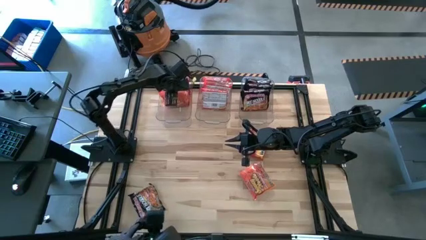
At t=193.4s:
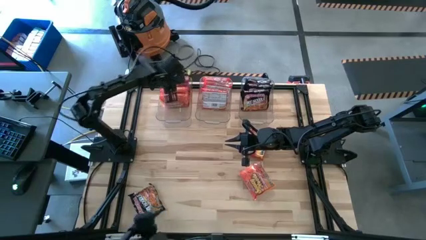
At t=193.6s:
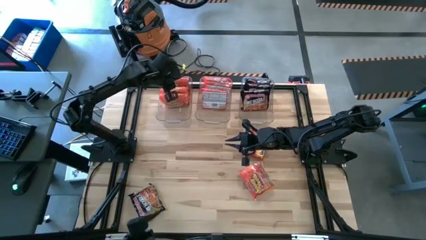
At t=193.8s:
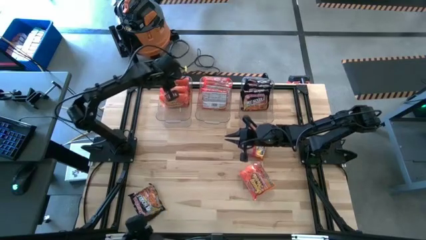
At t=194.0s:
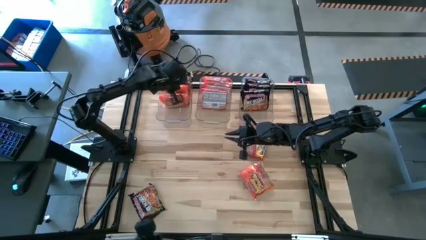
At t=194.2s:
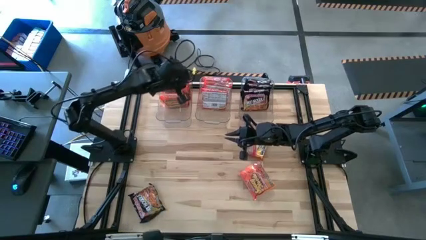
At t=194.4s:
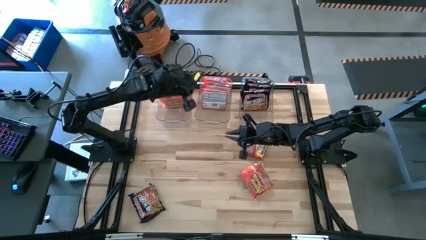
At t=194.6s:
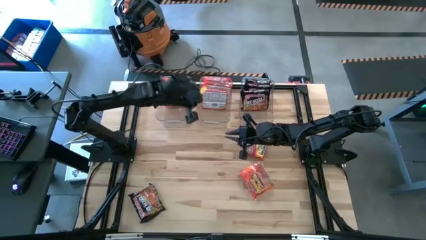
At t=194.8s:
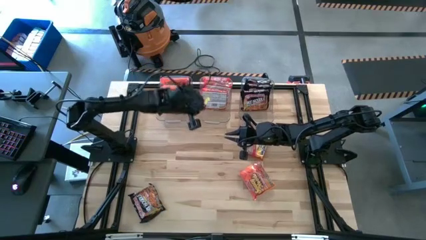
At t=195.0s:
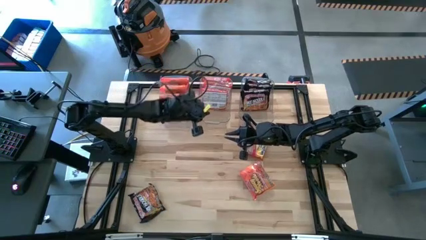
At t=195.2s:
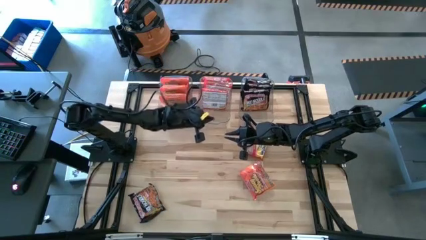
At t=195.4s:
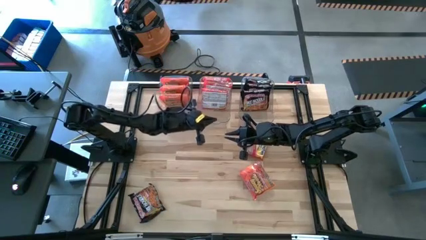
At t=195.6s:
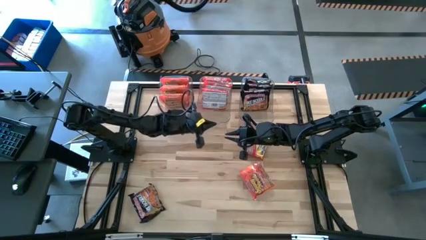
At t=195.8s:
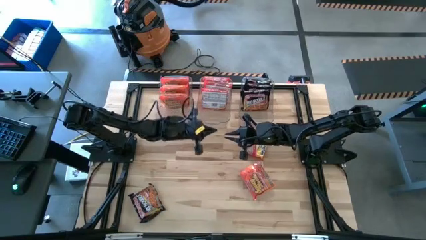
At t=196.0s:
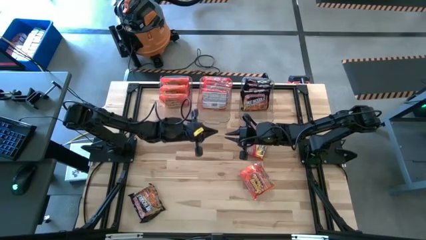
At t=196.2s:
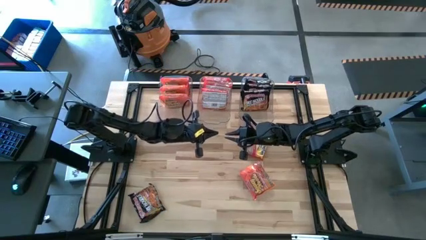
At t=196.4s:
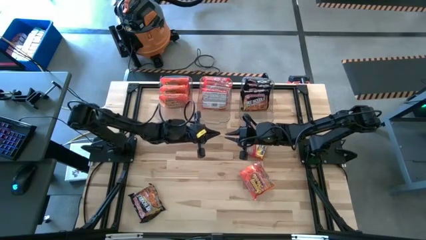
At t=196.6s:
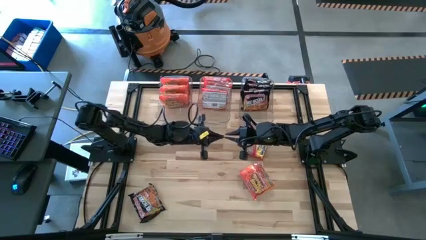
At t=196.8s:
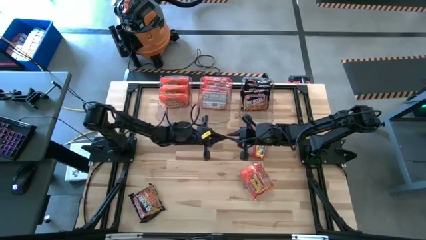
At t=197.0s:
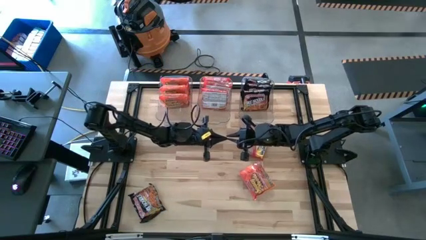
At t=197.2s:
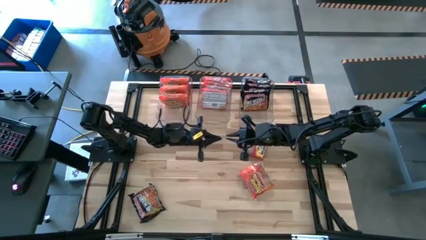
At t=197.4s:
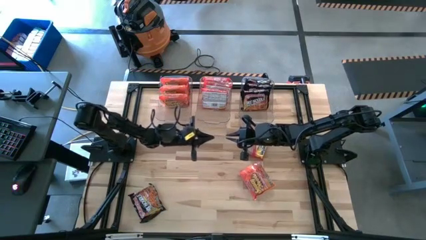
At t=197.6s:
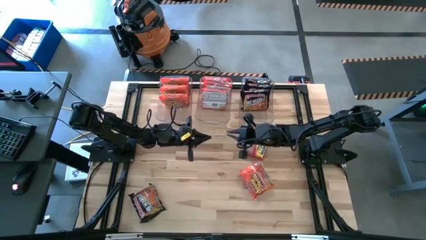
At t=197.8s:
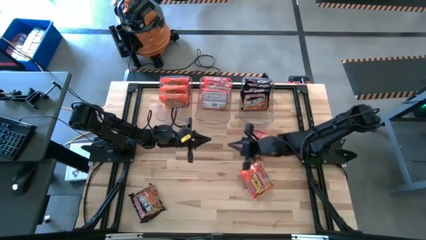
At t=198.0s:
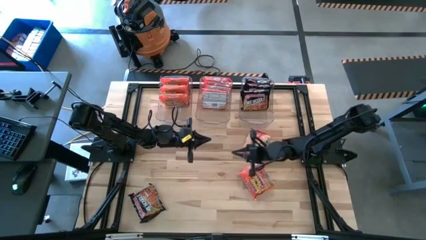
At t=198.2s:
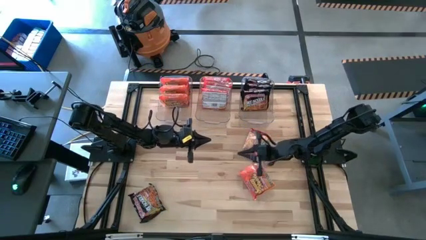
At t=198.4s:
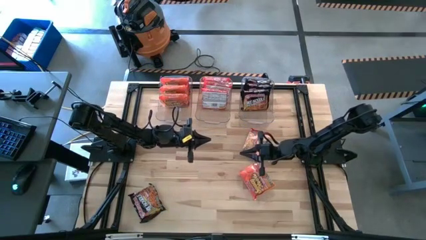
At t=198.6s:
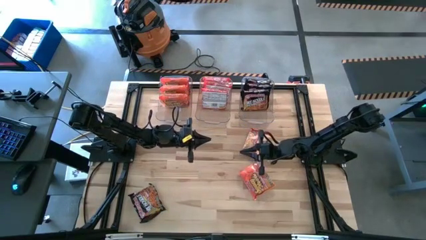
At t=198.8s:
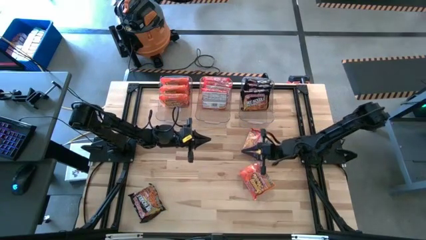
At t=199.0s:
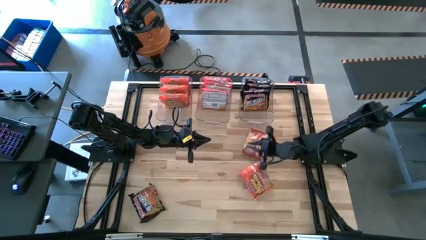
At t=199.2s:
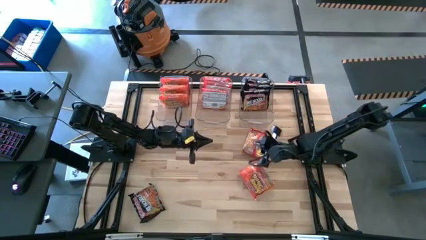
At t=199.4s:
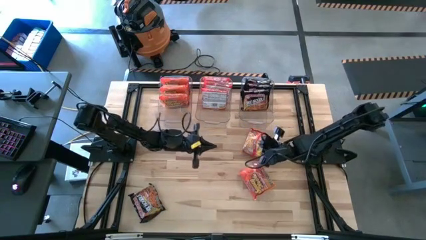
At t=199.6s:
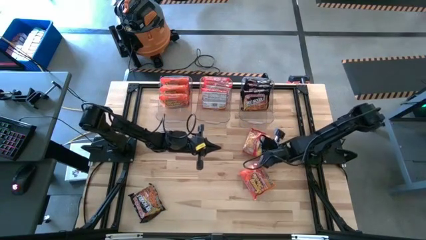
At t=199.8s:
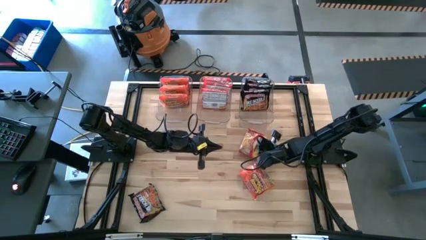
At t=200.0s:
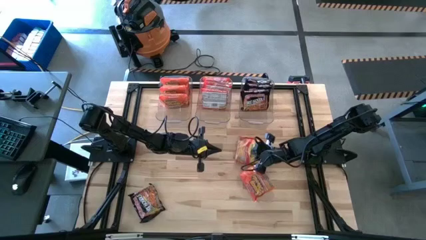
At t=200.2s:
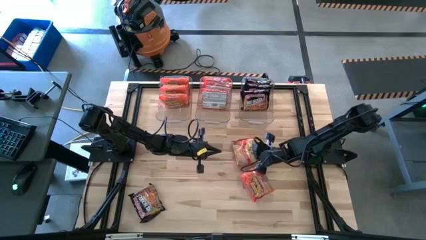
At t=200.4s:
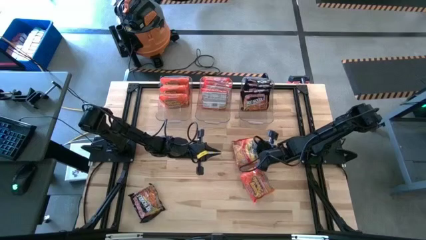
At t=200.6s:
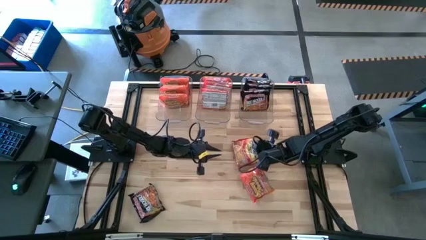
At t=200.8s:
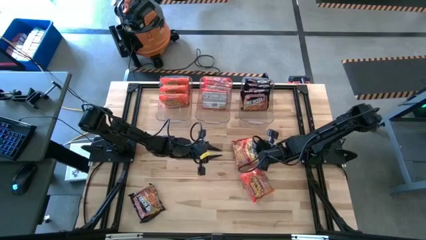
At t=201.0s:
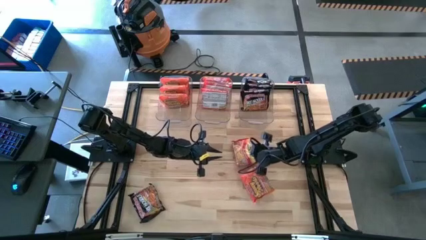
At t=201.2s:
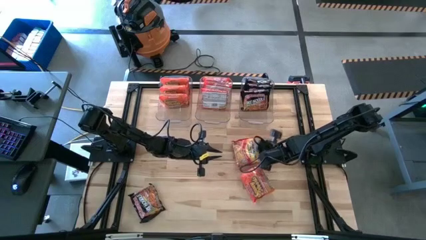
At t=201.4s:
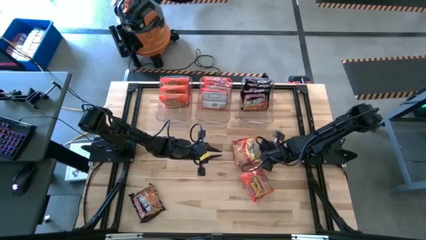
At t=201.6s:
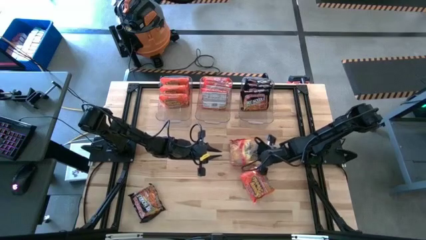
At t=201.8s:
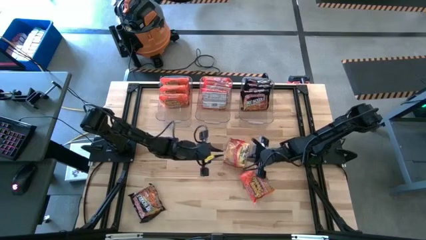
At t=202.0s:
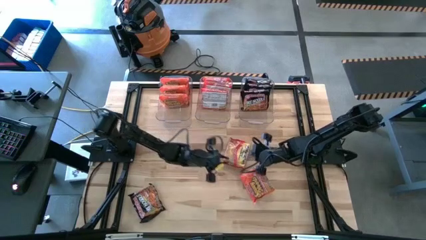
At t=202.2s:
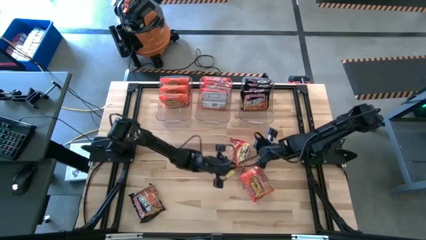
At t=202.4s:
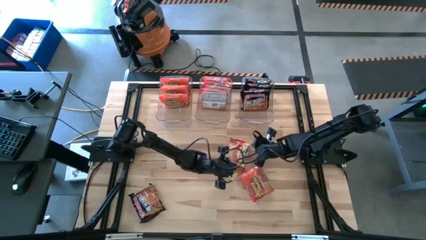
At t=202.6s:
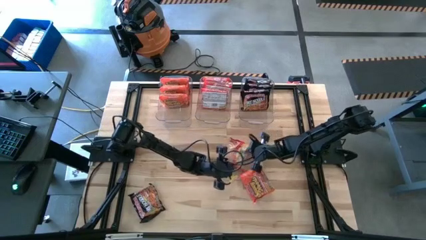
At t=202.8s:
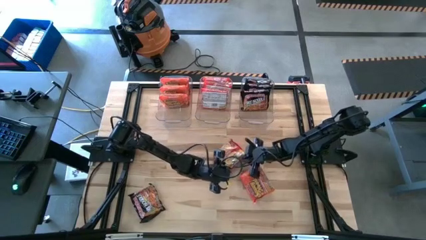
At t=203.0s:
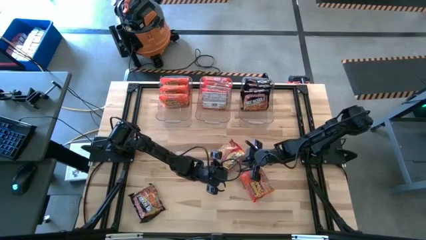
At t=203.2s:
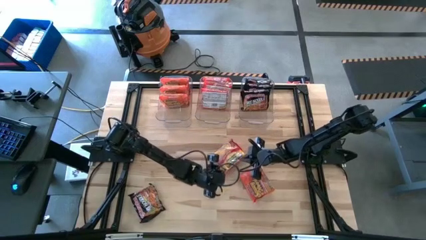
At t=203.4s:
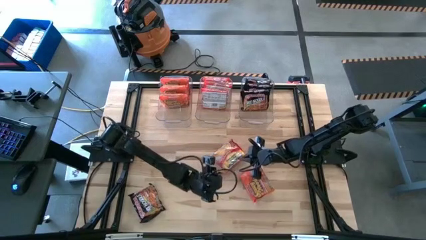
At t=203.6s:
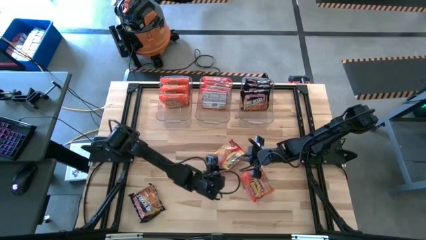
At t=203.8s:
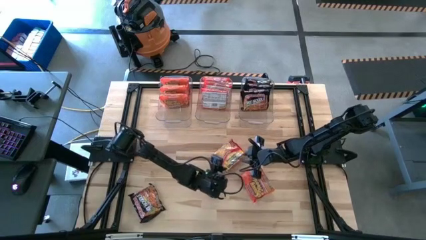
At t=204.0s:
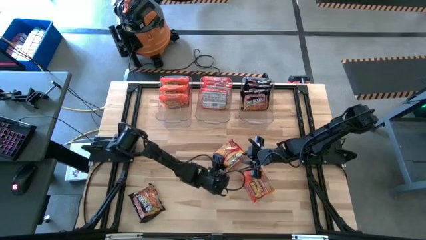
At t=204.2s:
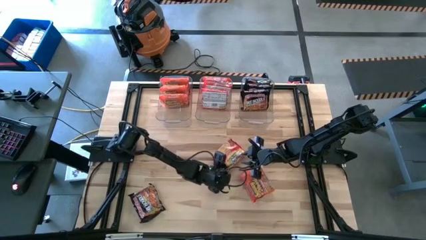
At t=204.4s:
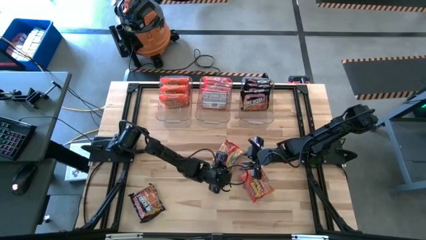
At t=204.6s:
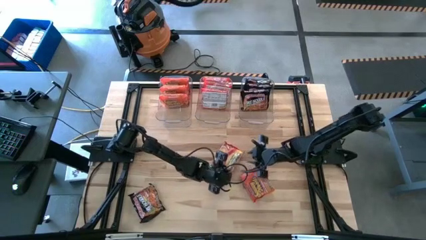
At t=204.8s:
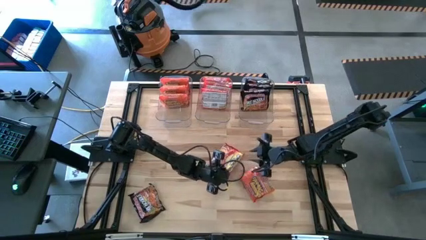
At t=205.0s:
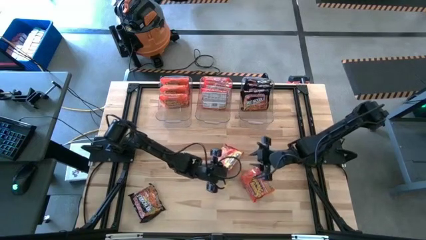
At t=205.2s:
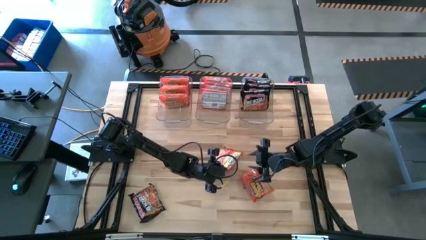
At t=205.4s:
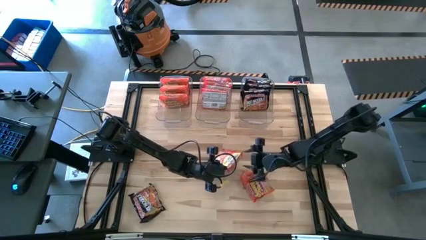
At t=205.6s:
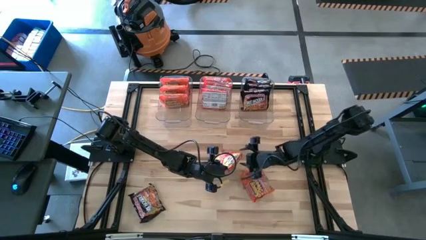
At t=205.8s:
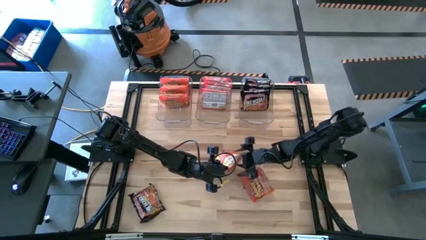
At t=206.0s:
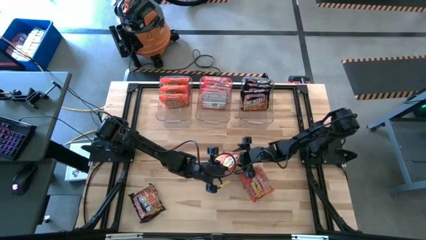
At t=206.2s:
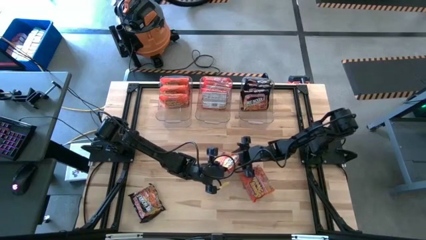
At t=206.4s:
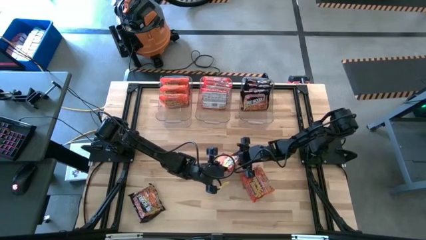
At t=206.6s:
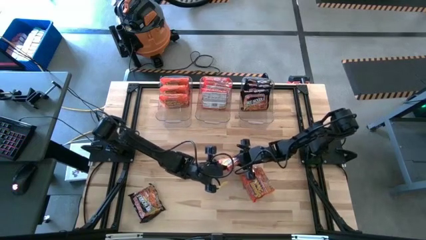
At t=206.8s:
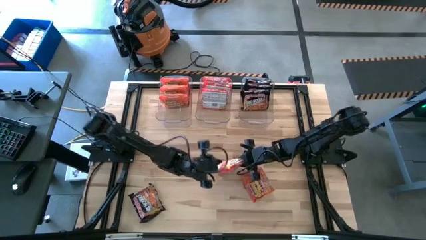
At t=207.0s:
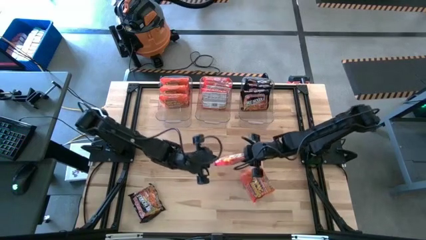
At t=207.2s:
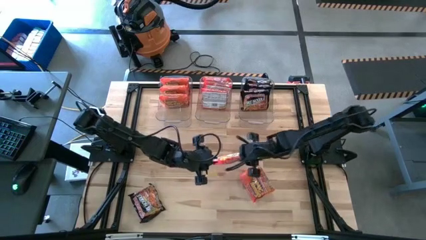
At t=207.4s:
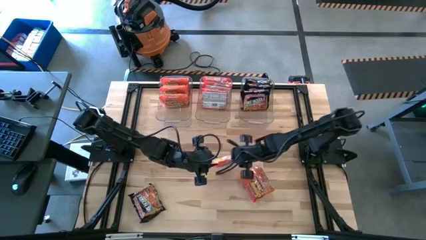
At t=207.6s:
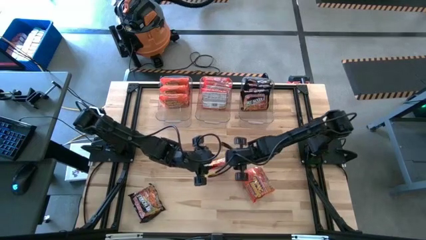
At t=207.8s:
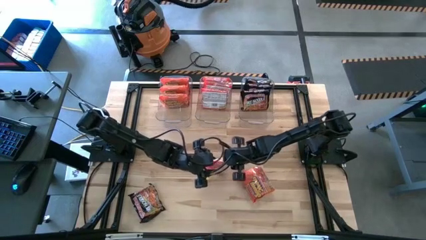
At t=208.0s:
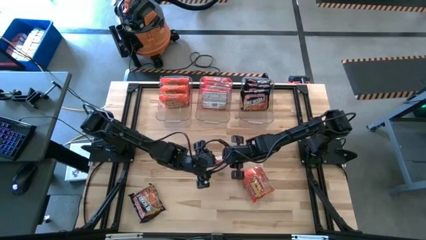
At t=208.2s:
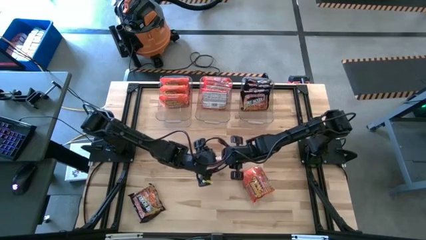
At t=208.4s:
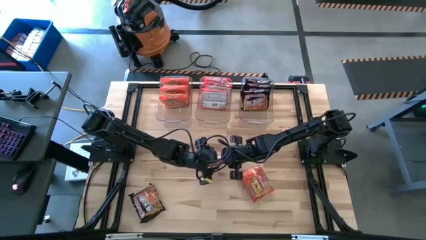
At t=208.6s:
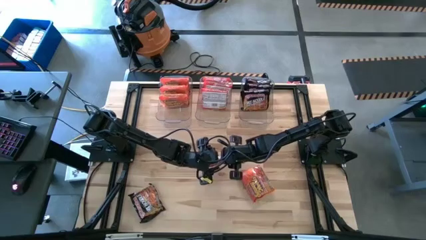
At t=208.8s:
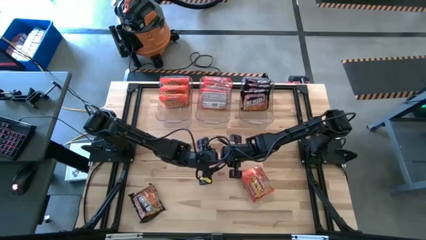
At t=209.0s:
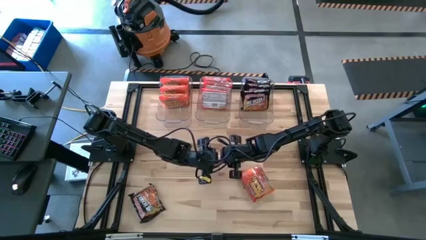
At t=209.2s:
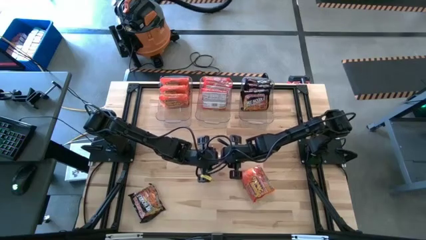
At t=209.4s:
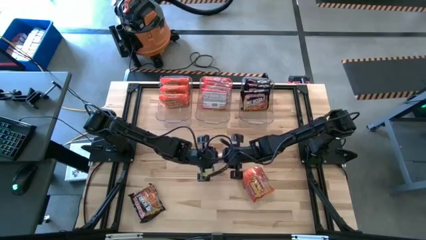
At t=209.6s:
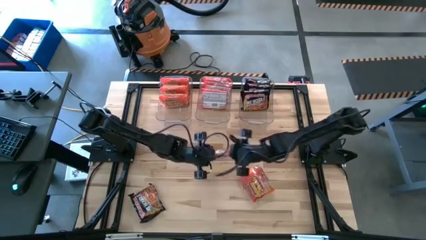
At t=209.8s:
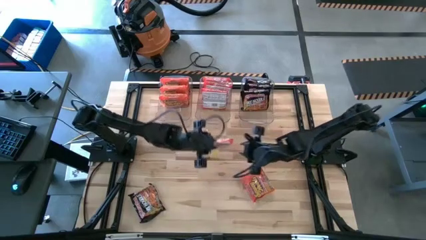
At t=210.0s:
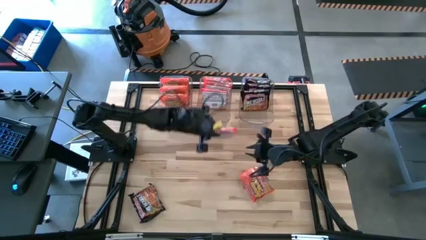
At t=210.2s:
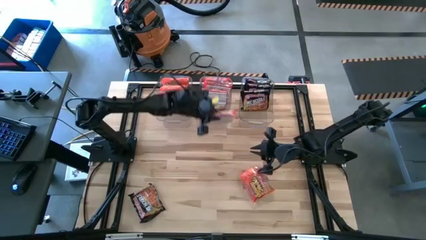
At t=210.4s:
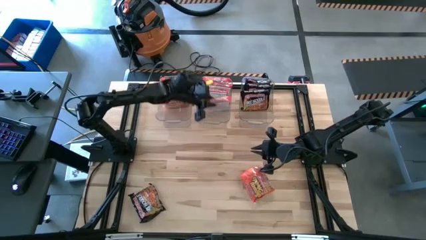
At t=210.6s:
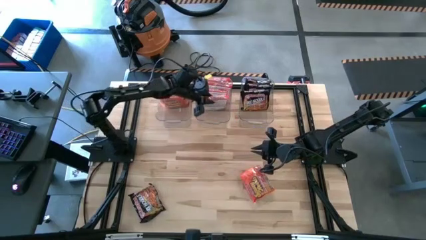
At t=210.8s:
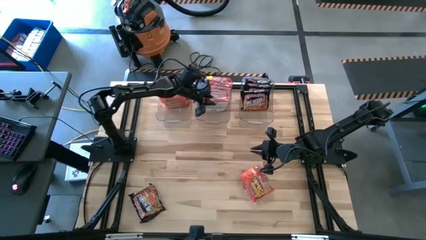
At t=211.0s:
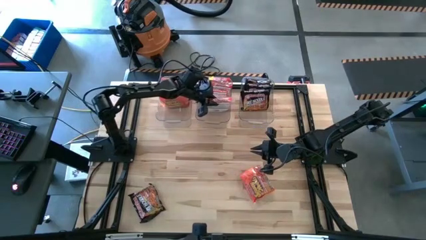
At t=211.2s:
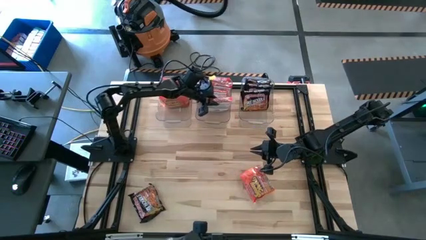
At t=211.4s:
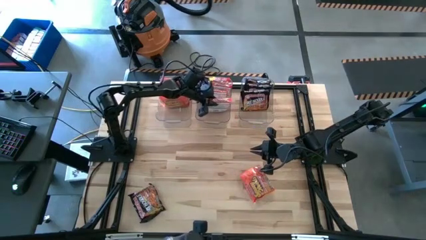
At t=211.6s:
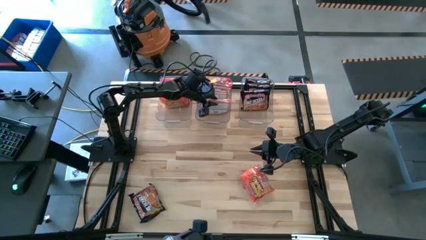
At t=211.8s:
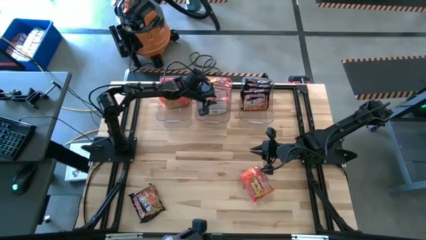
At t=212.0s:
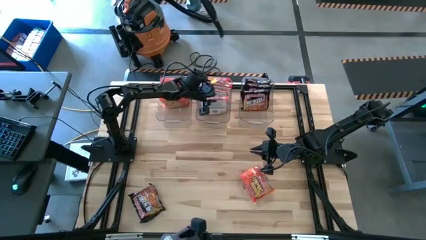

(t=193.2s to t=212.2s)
Task: Sort Maruchan noodles
Put the red noodle pack into the middle transparent bin
